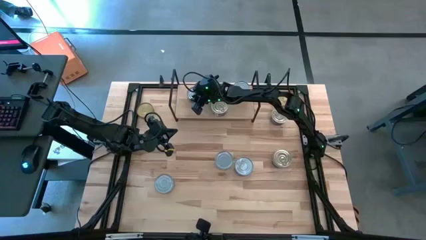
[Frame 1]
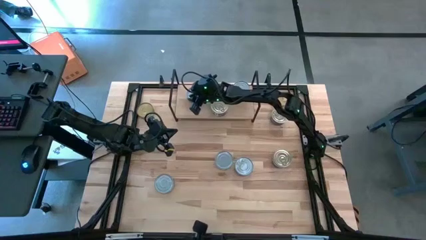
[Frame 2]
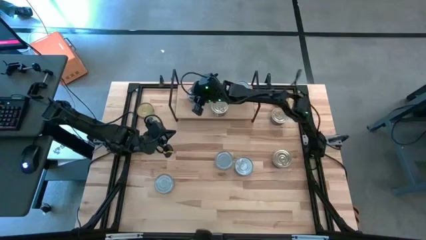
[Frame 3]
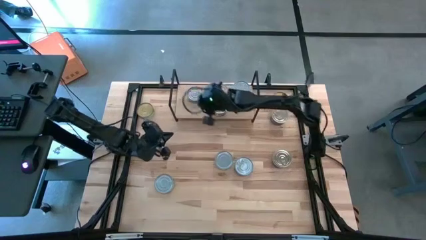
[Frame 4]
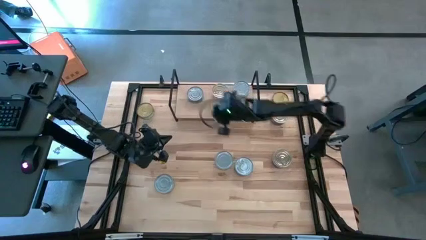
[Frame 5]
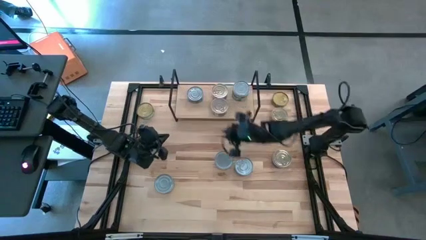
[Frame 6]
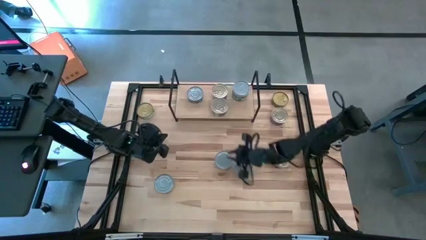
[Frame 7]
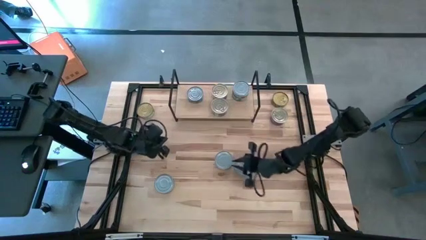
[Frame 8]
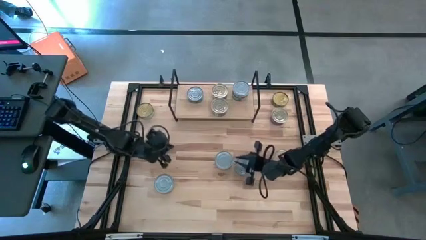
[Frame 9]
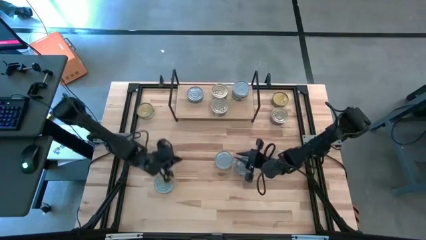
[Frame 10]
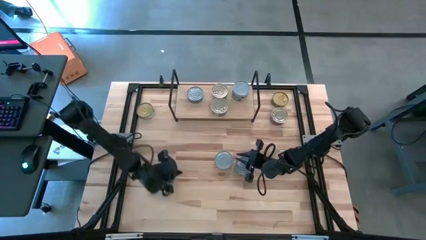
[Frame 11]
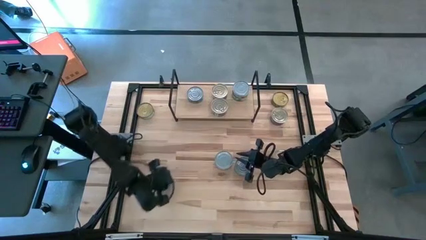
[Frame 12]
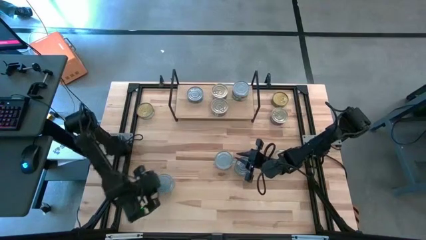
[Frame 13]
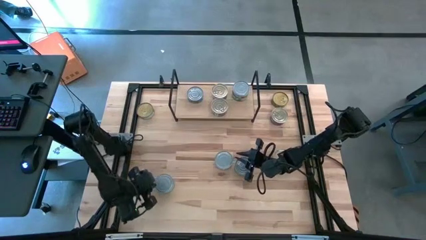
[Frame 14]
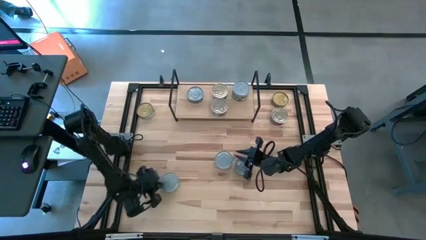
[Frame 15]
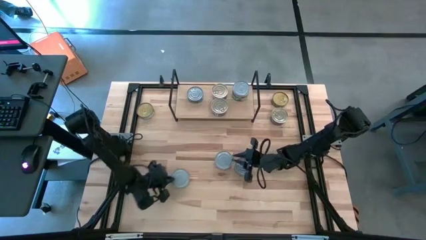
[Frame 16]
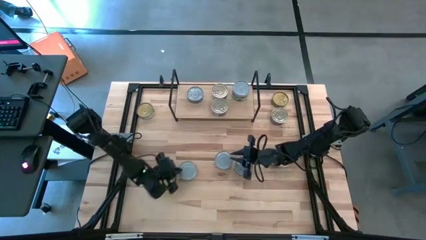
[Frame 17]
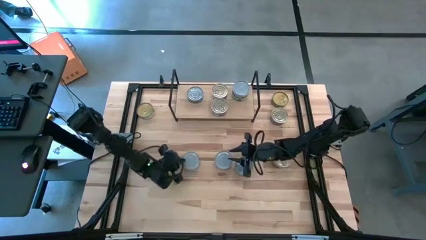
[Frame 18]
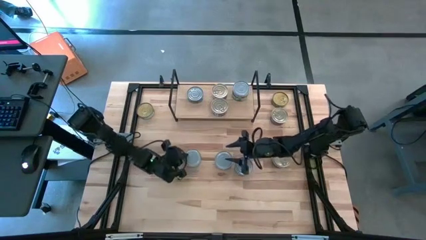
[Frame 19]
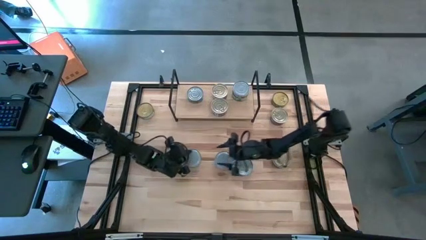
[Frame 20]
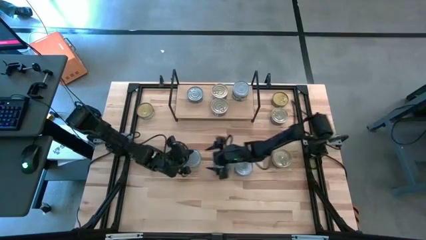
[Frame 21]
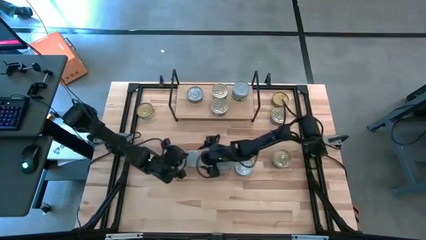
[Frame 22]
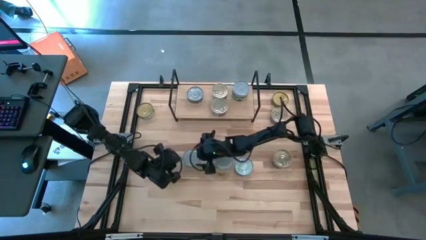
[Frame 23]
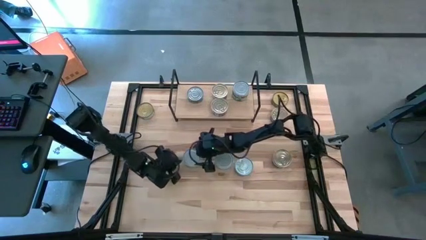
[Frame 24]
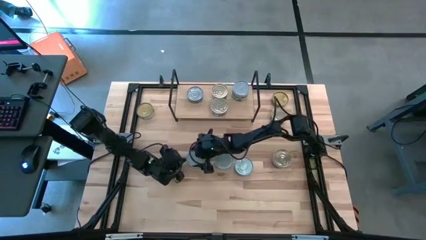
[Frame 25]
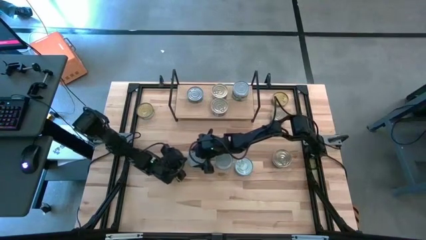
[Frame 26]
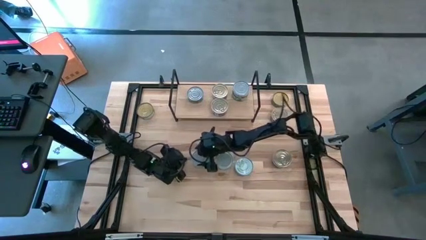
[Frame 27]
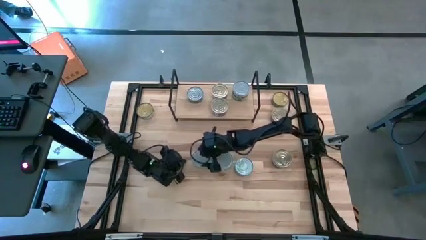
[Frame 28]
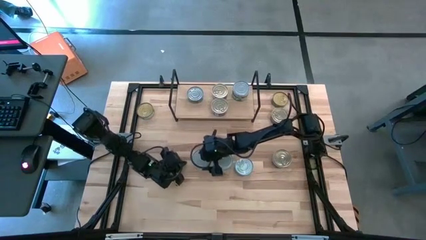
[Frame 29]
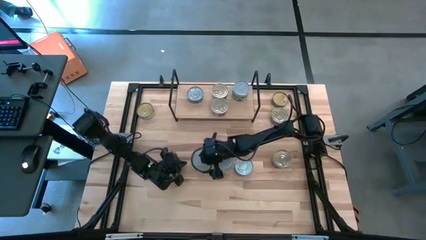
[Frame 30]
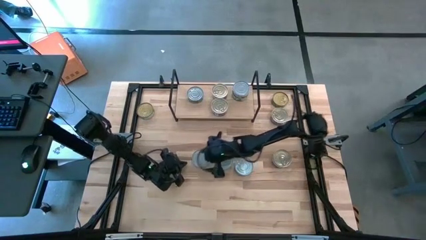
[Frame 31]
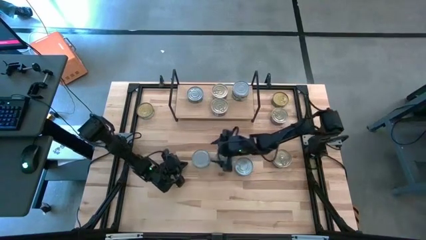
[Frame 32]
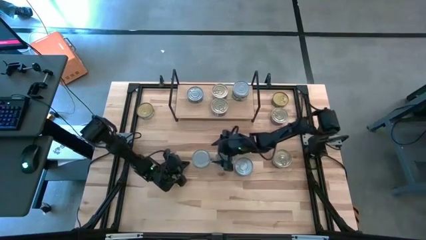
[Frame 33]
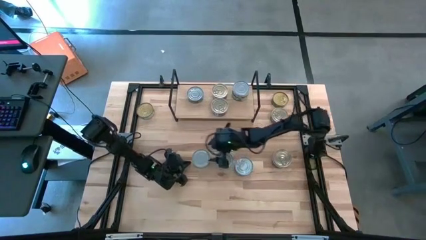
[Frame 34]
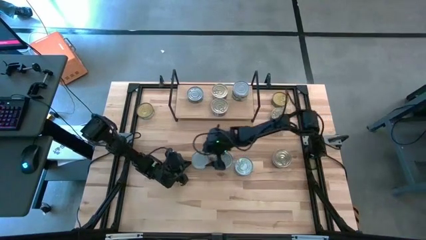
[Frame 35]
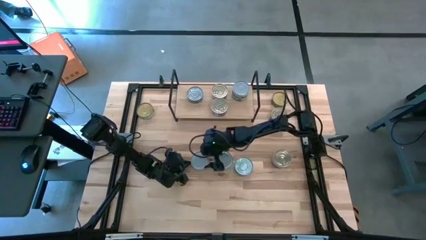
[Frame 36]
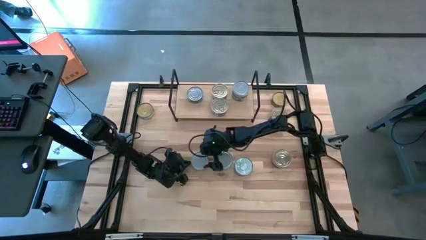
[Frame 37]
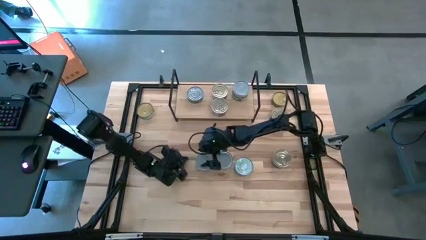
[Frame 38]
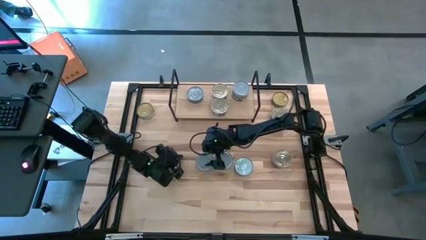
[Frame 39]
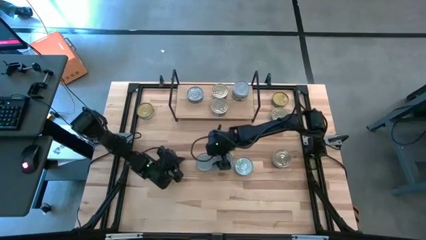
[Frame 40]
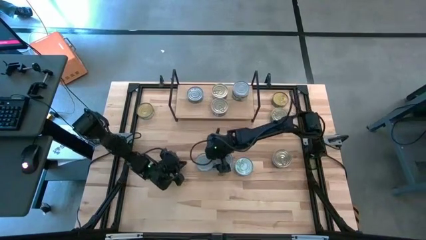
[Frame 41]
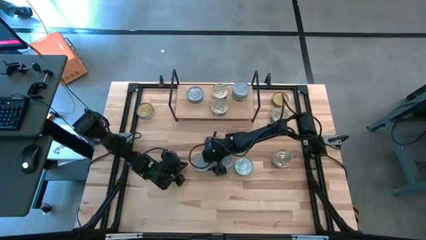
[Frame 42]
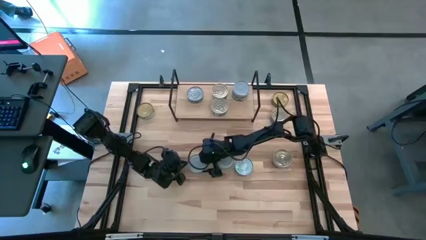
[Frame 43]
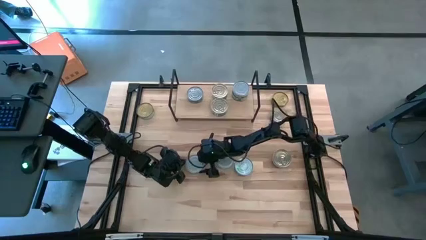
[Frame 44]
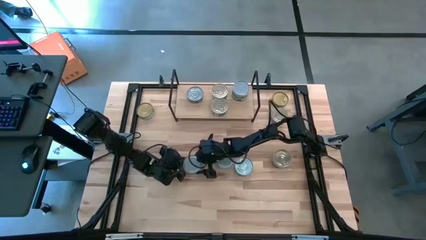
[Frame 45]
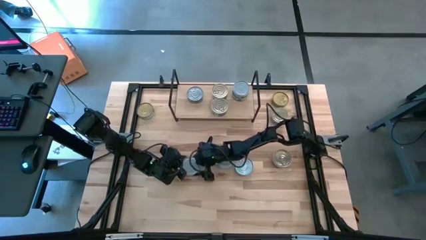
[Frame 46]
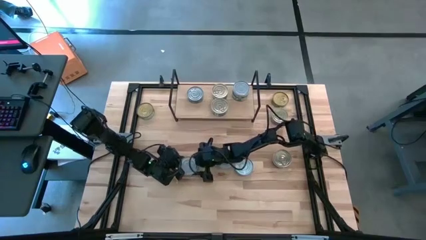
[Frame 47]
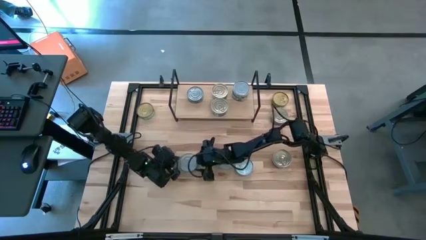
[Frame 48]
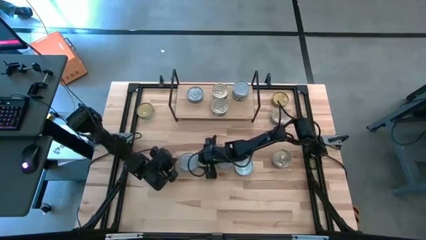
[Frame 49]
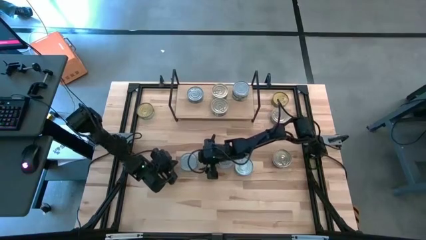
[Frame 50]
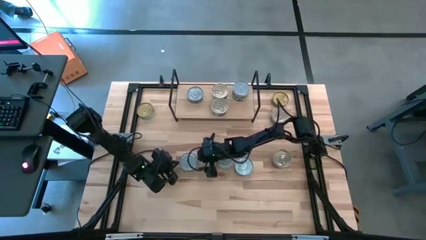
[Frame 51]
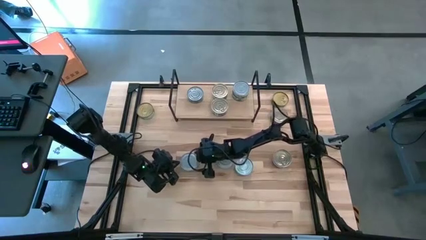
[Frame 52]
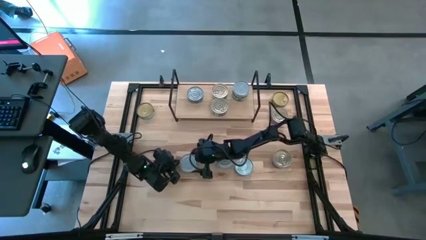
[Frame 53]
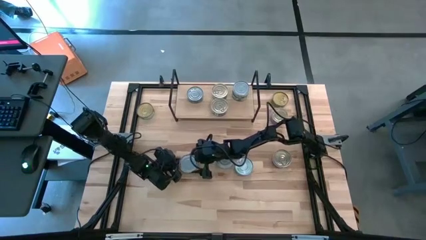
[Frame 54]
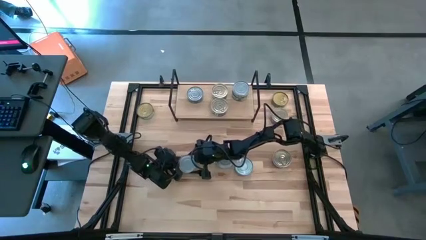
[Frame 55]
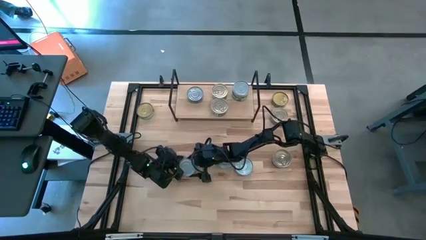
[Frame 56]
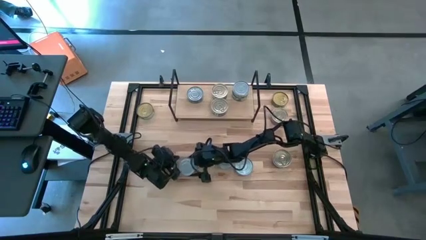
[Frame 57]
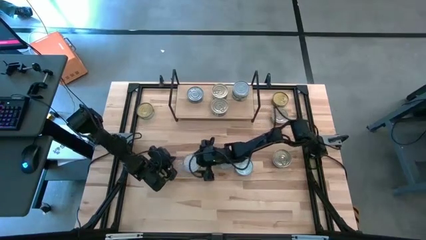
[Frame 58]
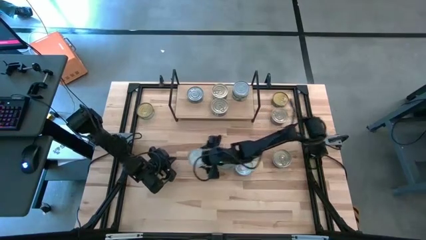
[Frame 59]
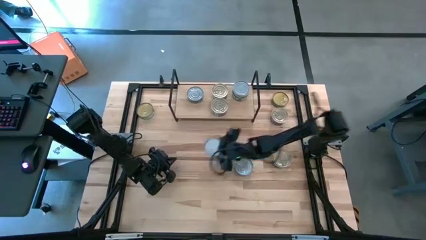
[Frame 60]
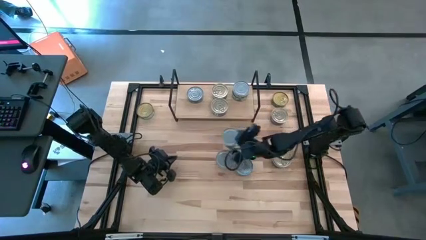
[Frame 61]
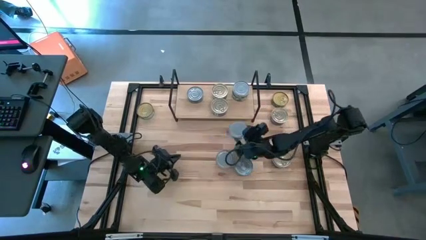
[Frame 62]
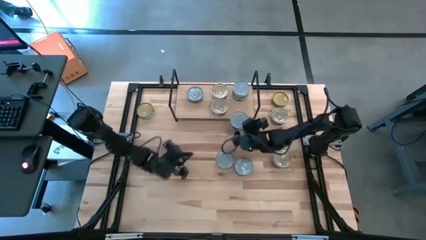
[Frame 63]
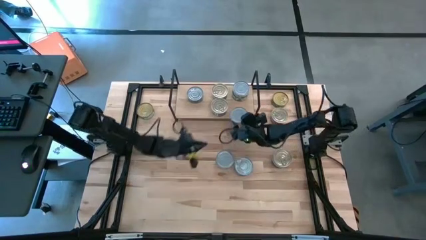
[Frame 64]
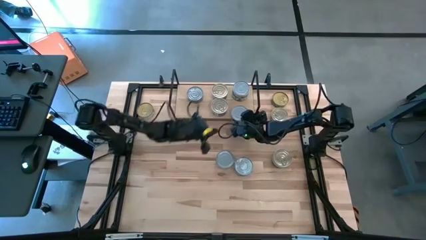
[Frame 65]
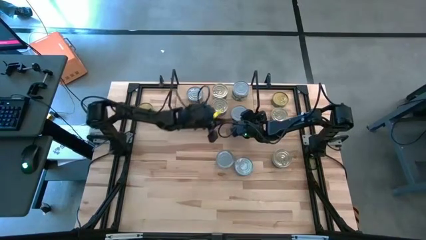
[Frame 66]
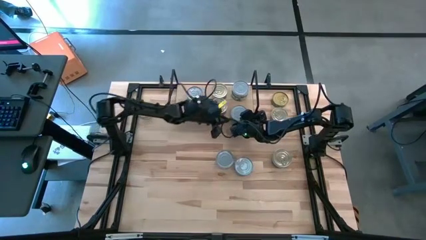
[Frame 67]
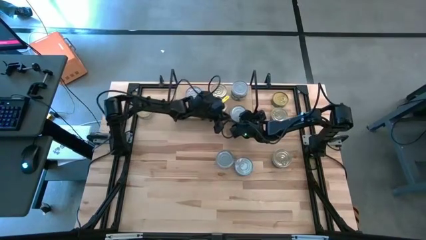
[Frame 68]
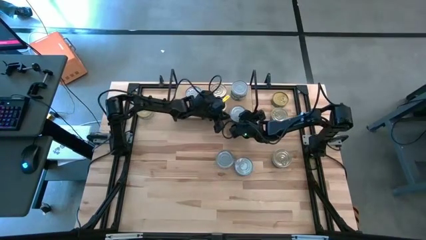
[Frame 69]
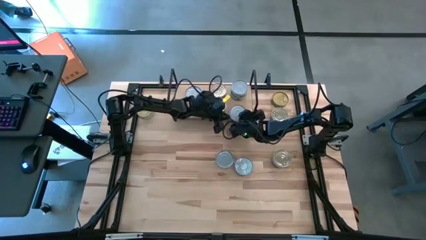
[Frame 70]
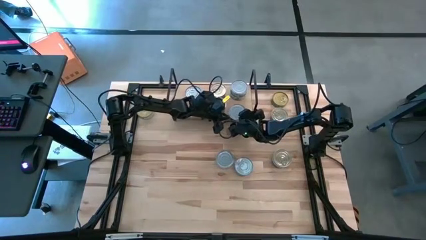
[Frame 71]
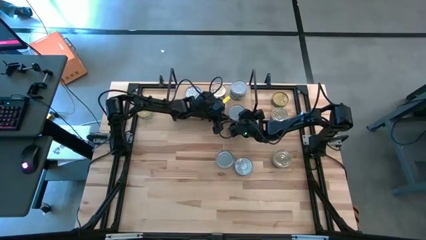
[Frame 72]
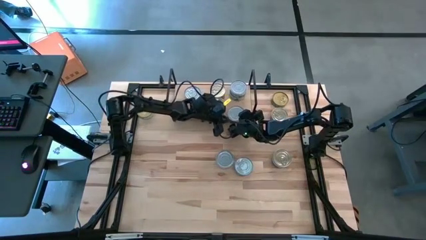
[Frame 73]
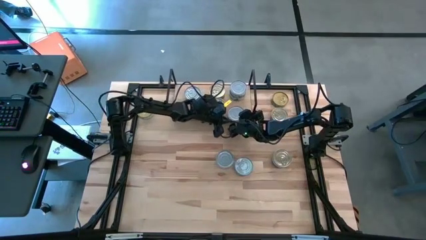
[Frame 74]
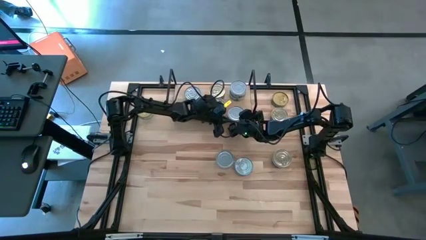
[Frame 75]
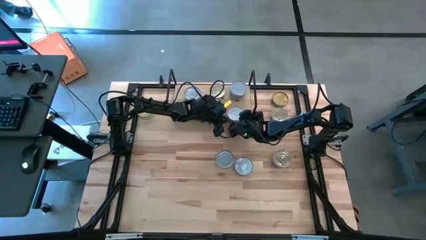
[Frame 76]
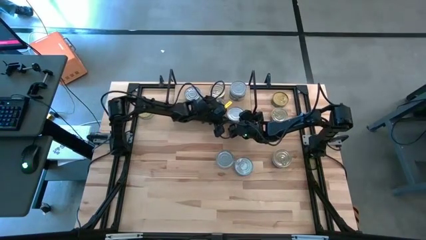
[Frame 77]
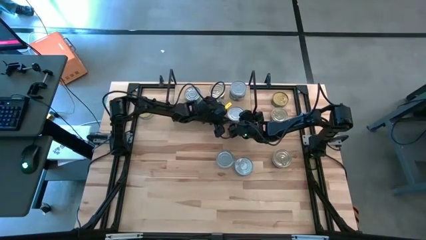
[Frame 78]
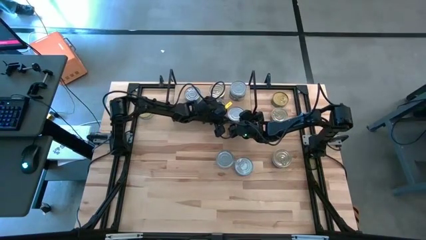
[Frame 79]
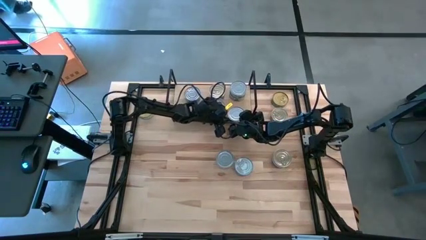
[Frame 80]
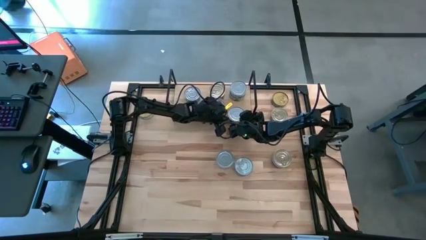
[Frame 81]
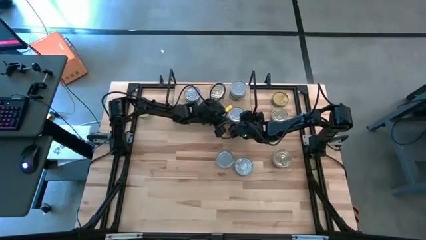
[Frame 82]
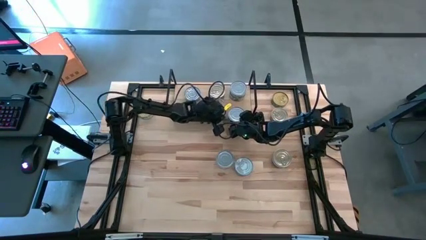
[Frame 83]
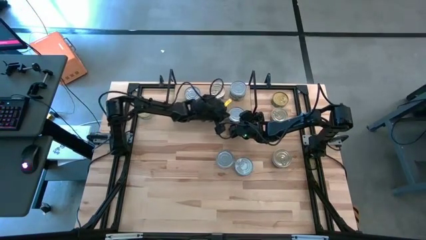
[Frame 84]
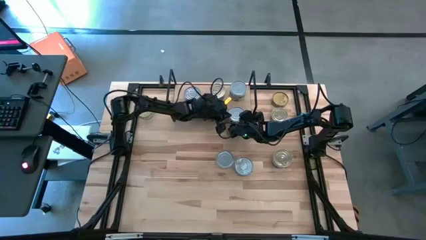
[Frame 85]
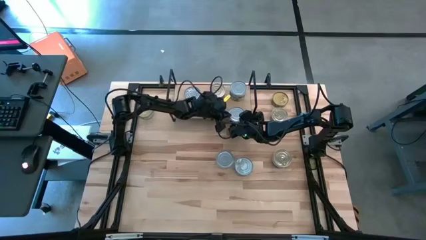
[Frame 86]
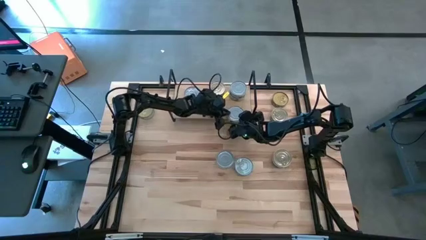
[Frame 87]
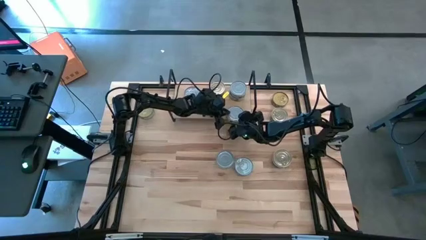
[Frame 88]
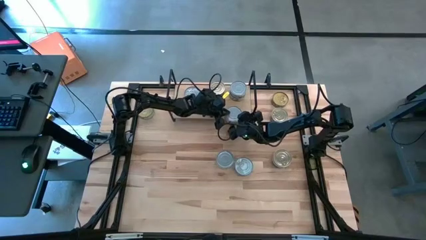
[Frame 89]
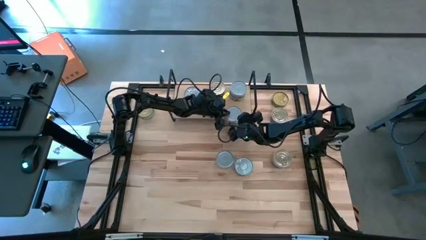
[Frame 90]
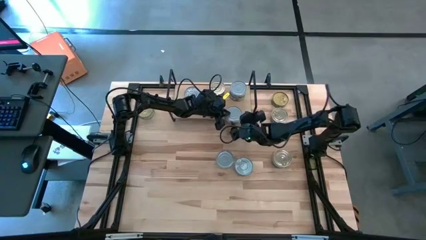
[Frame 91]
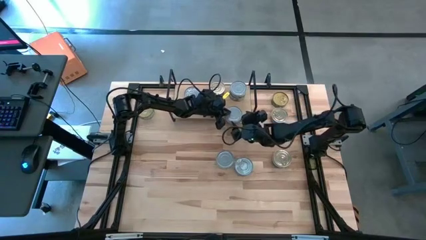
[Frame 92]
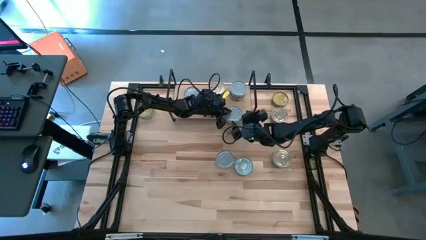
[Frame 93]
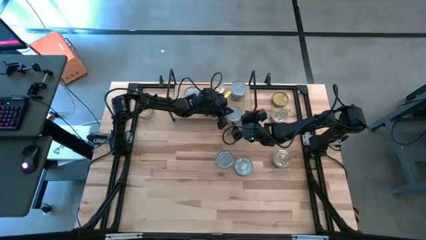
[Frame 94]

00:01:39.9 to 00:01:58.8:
Task: Stack canned seafood by type on shelf
Put the green-white tuna can on the shelf
